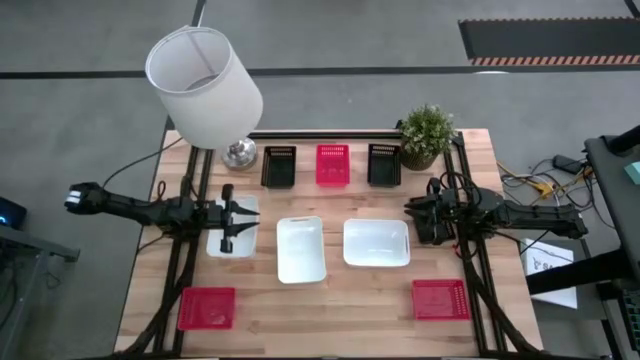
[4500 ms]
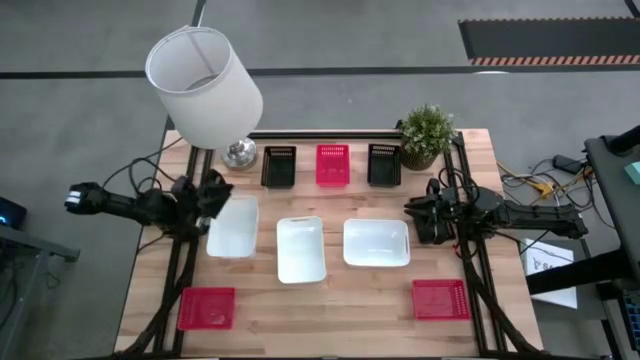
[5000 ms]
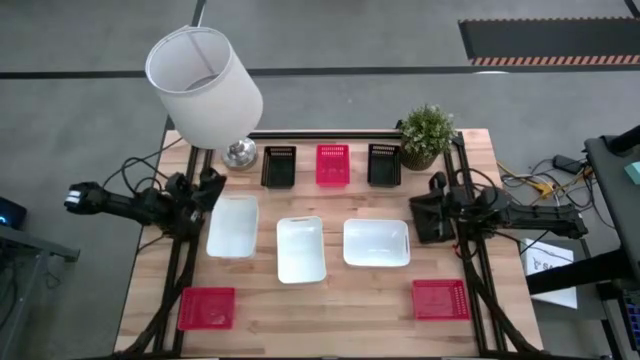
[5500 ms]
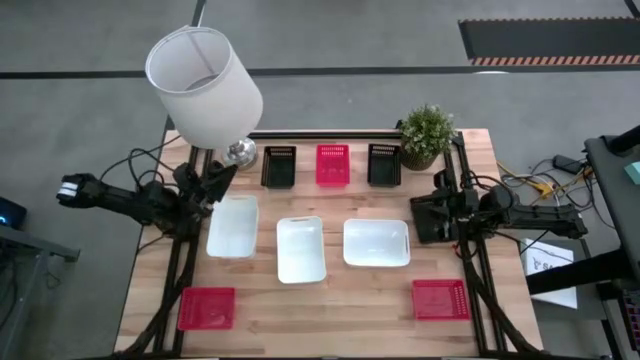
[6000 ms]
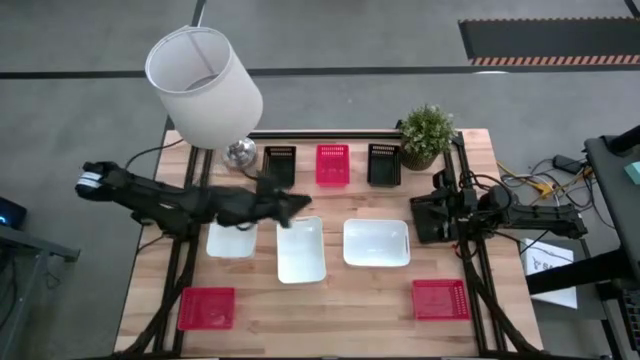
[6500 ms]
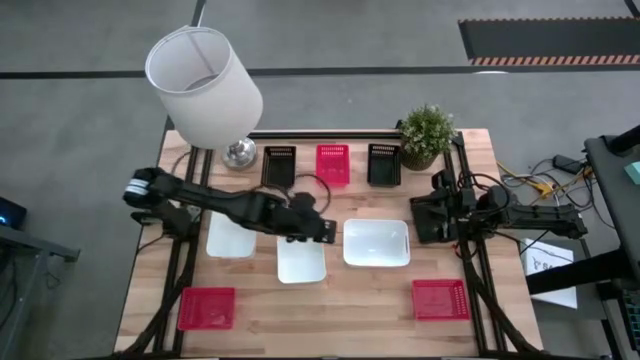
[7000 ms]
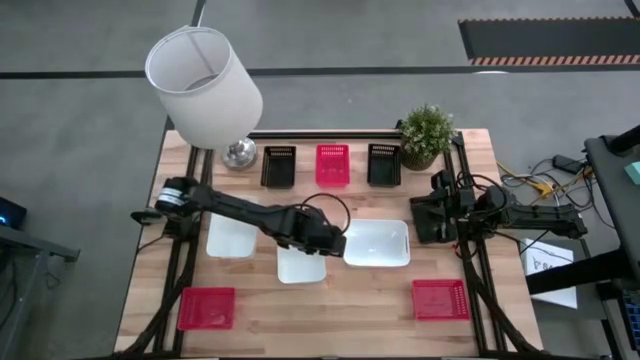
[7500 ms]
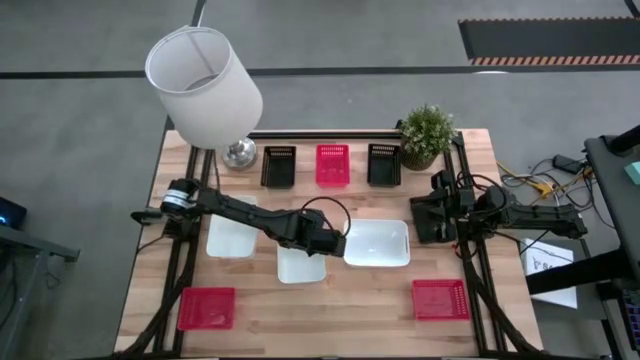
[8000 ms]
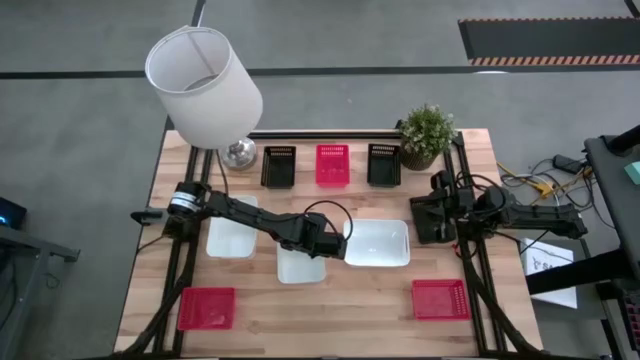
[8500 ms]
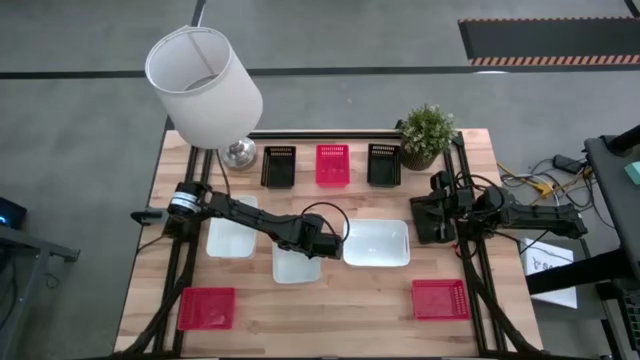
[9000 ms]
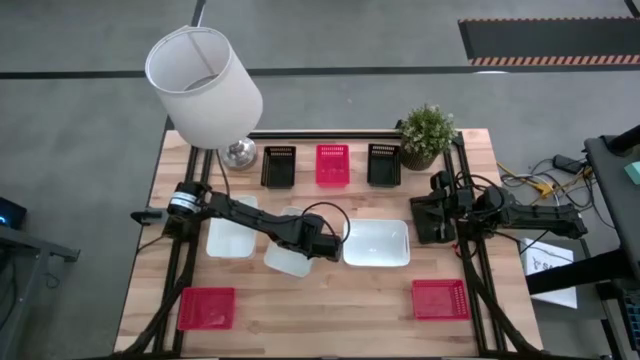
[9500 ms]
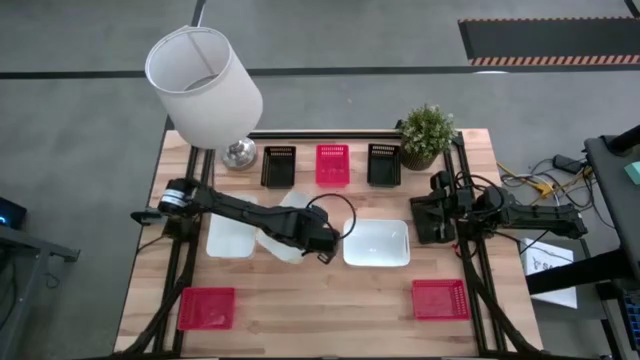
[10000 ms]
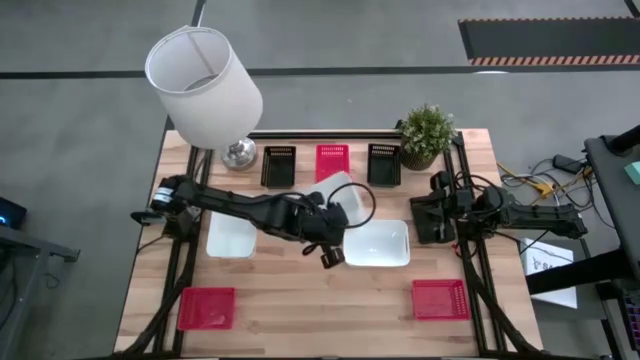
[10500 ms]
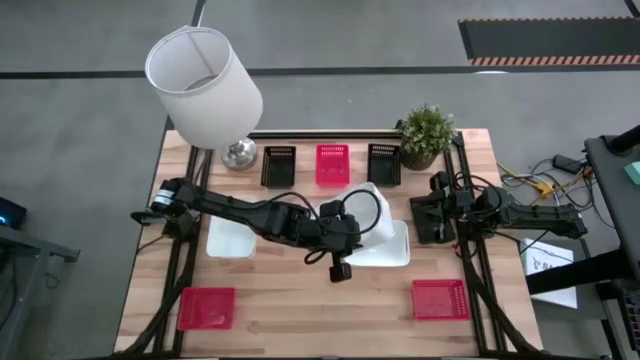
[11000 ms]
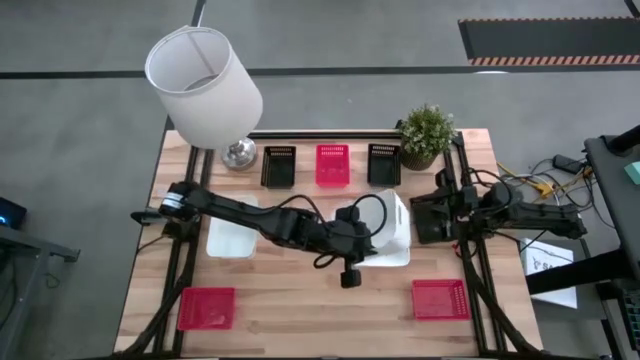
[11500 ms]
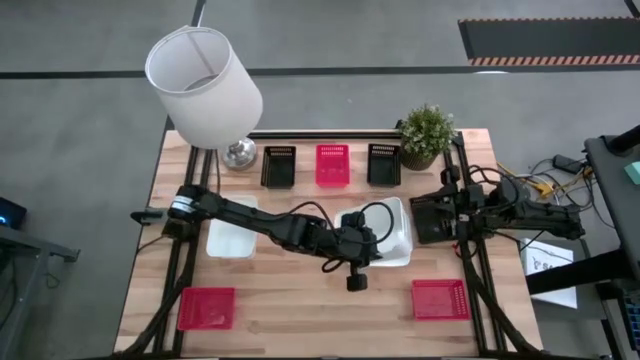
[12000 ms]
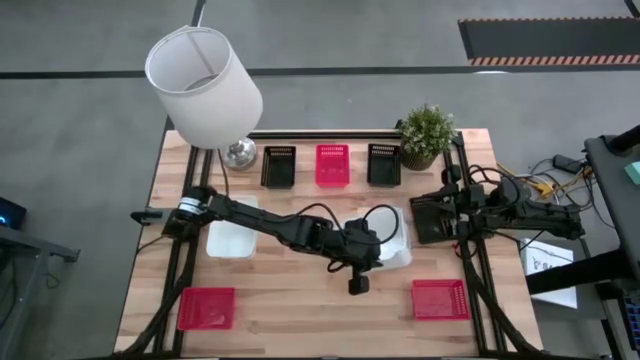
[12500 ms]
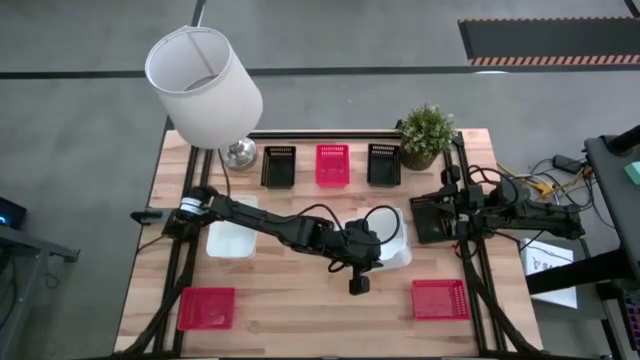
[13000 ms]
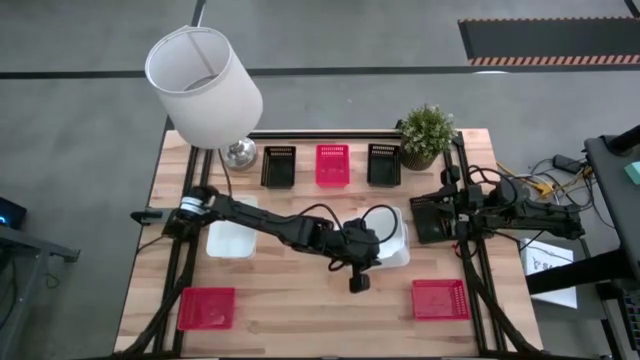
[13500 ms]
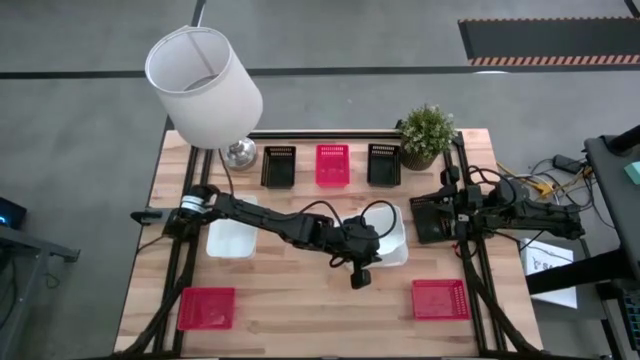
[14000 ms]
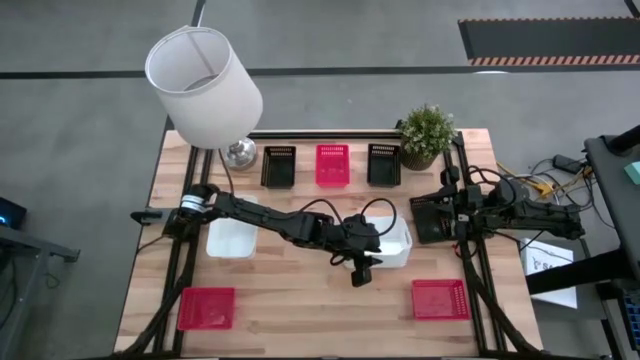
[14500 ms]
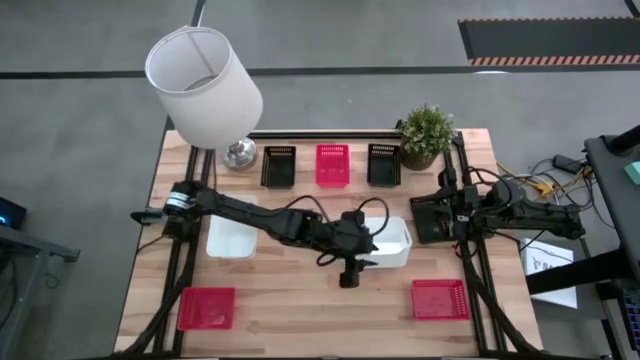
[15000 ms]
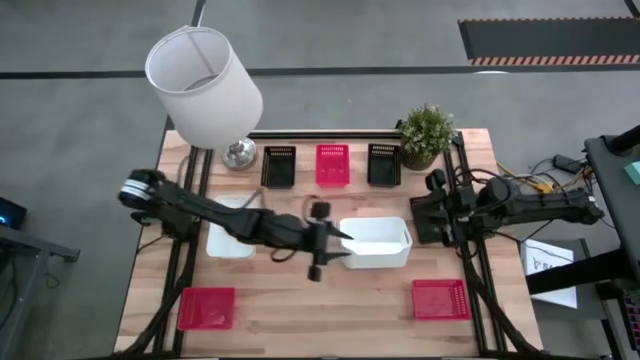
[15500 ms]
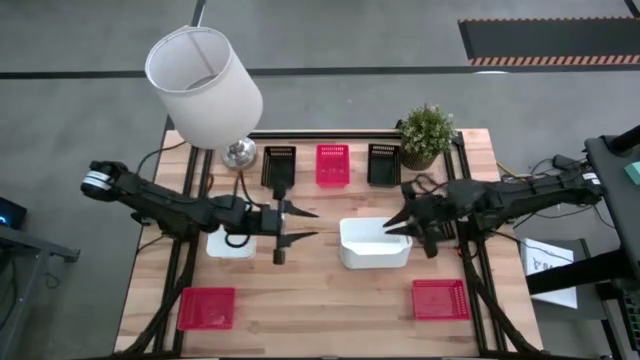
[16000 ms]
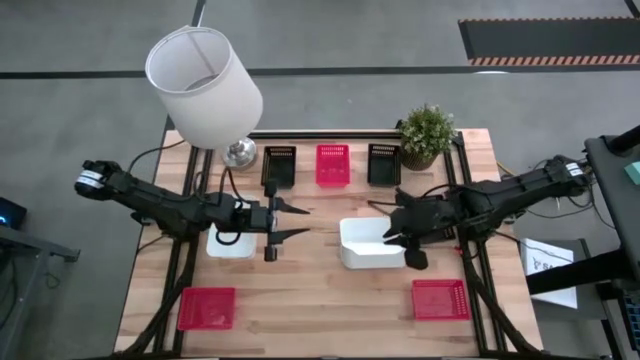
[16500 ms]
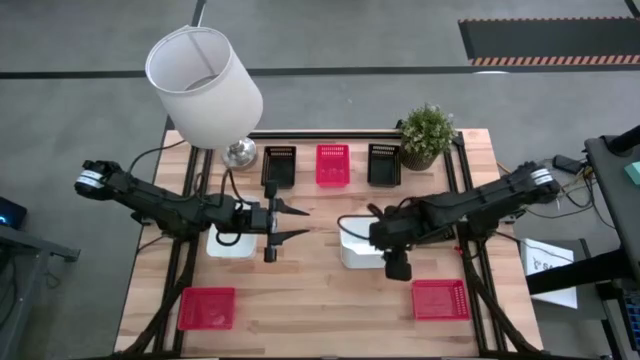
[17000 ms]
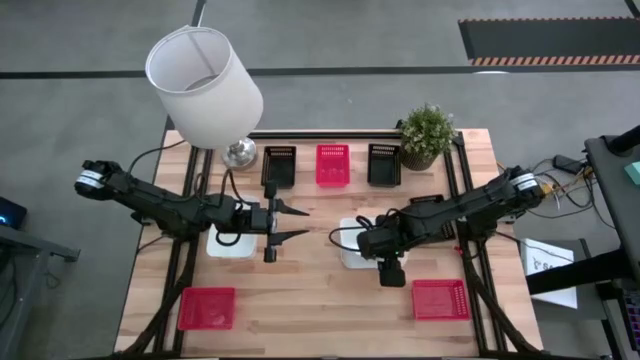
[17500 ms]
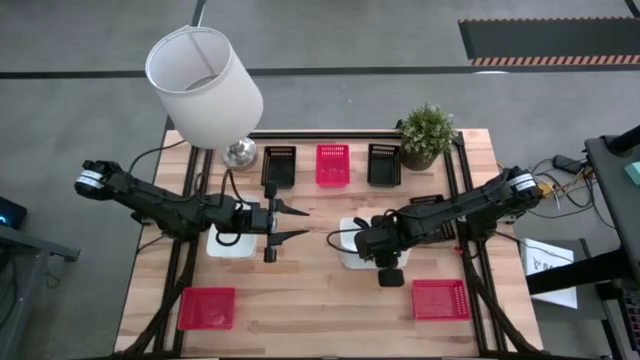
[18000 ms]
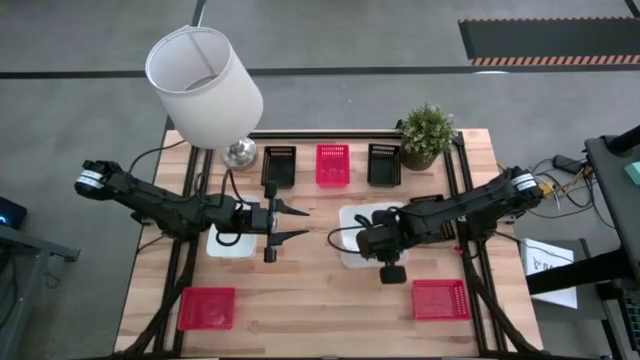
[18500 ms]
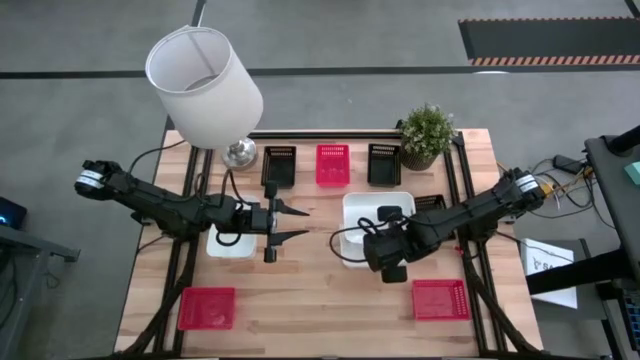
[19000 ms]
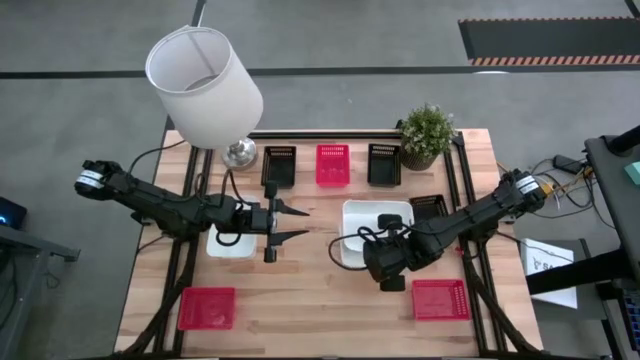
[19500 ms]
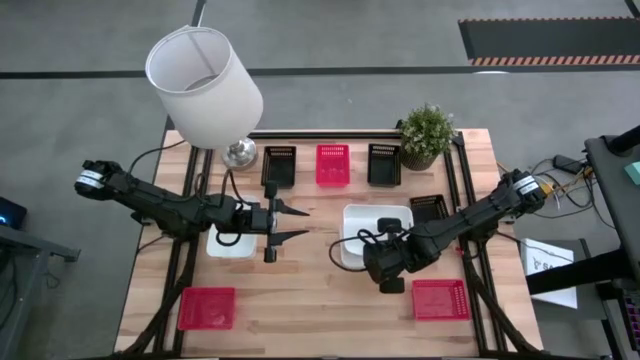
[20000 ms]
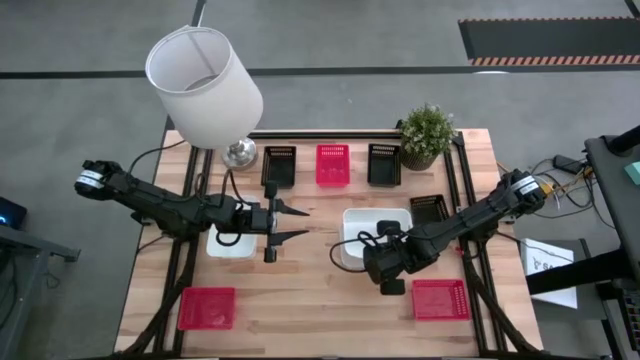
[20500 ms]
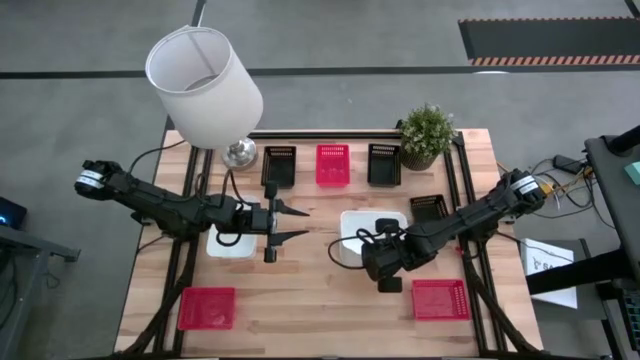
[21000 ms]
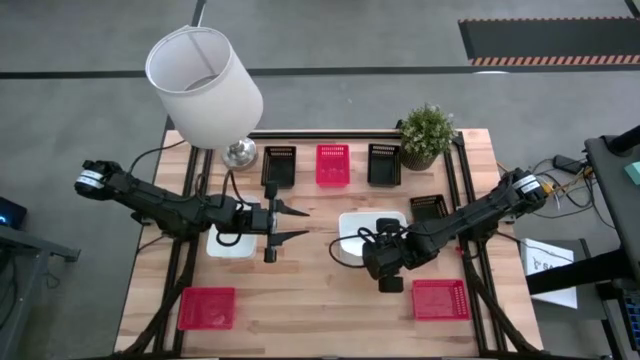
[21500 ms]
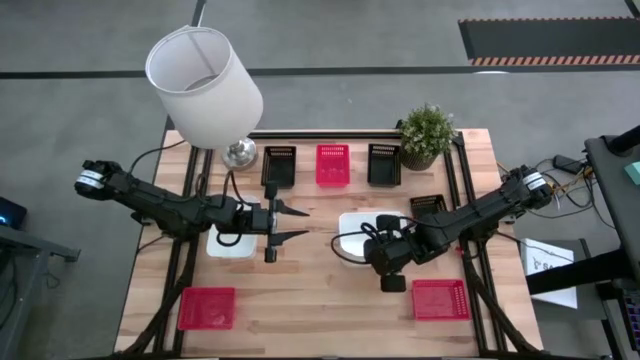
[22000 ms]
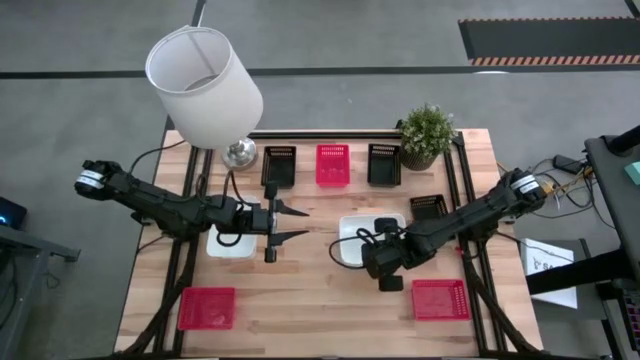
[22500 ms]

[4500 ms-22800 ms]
Stack the center white bin into the right white bin
